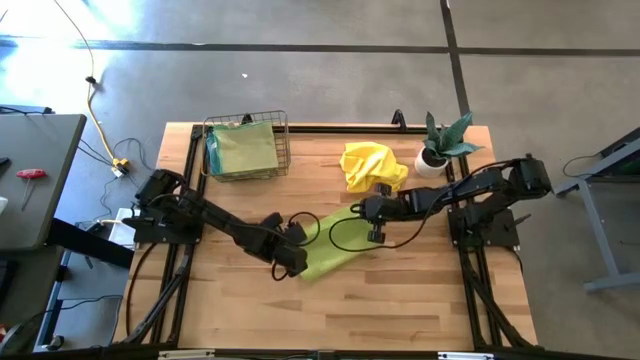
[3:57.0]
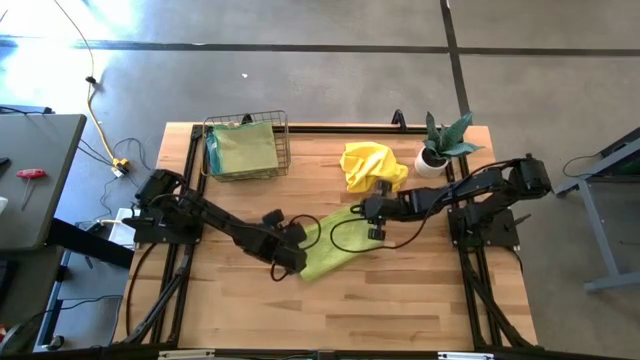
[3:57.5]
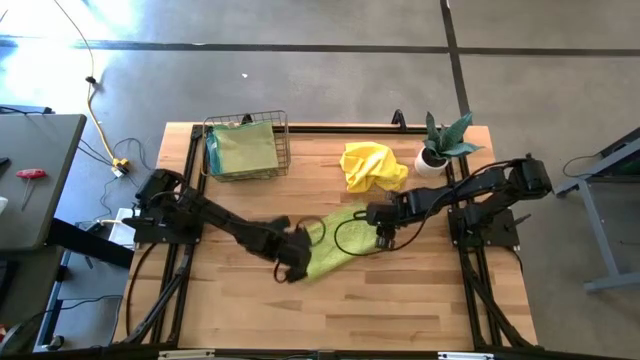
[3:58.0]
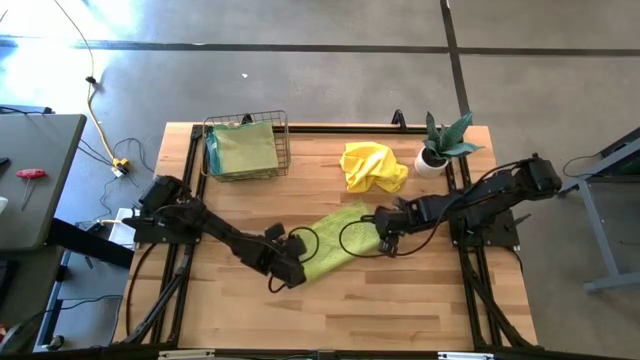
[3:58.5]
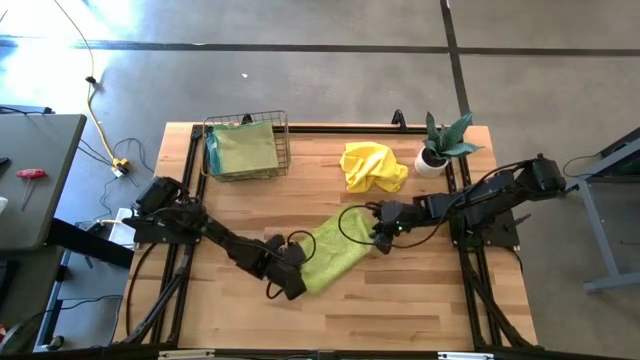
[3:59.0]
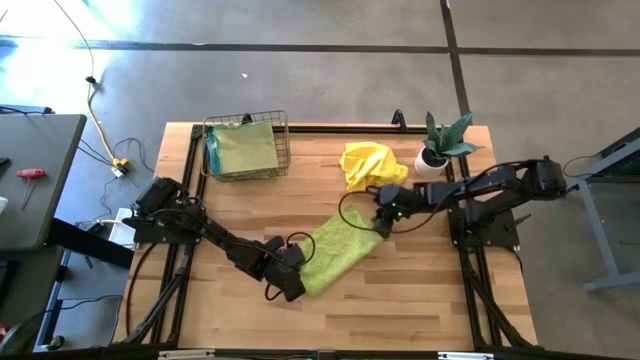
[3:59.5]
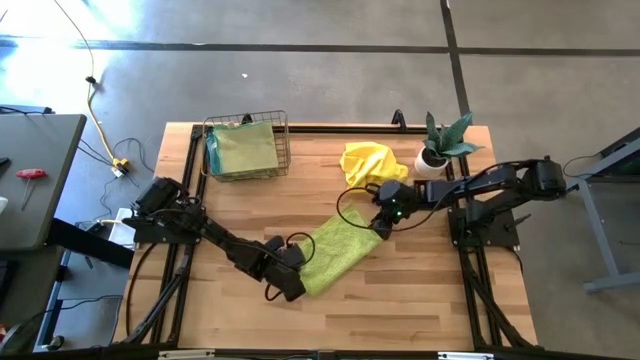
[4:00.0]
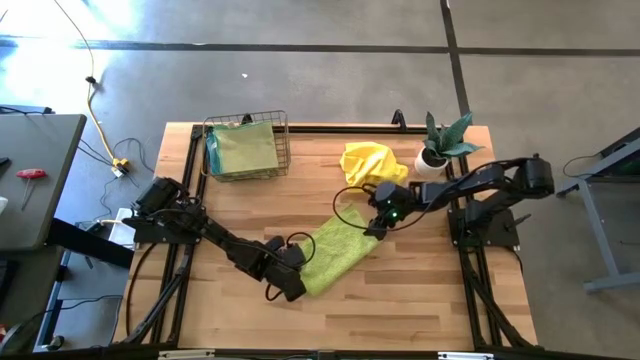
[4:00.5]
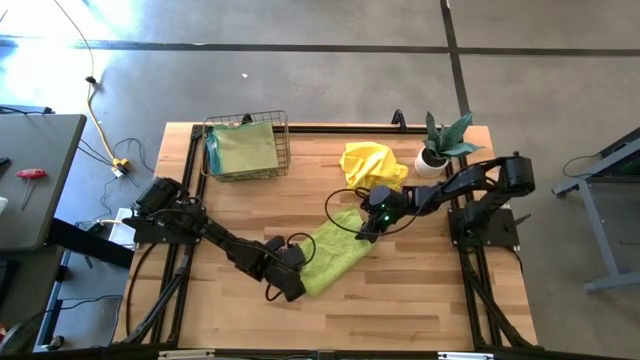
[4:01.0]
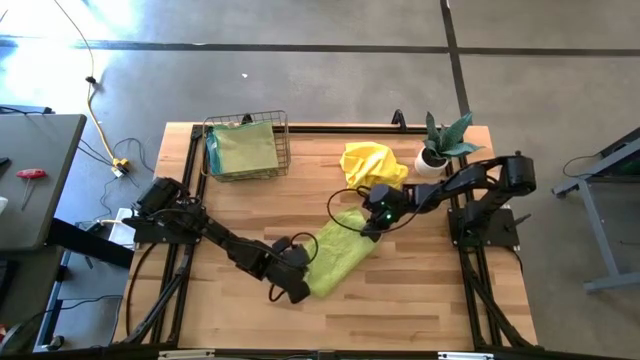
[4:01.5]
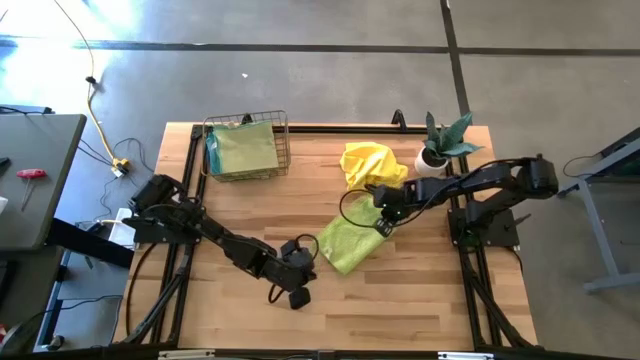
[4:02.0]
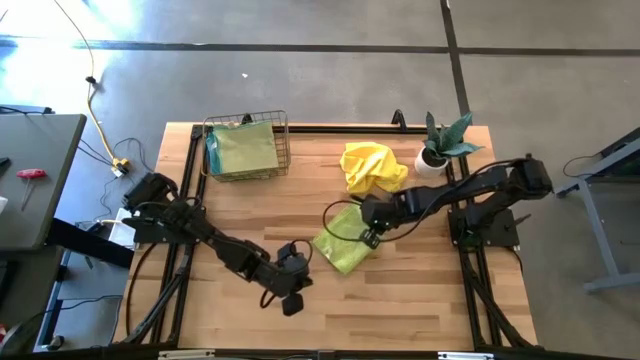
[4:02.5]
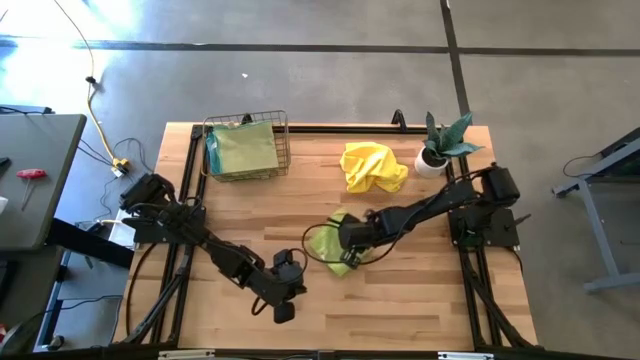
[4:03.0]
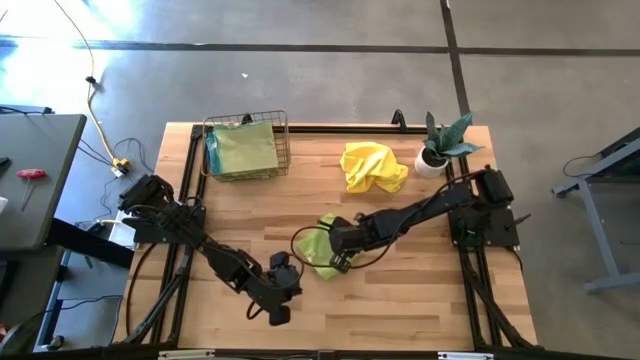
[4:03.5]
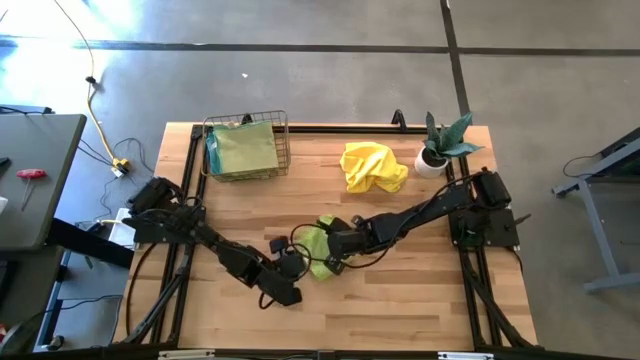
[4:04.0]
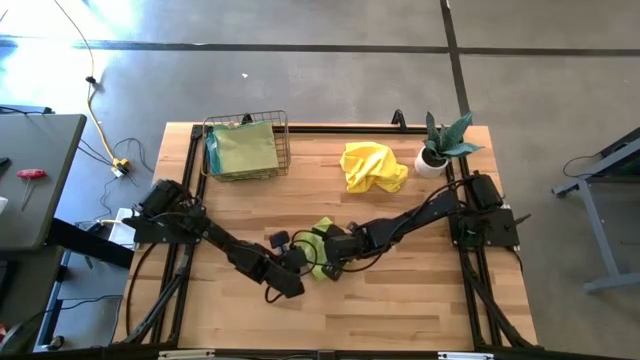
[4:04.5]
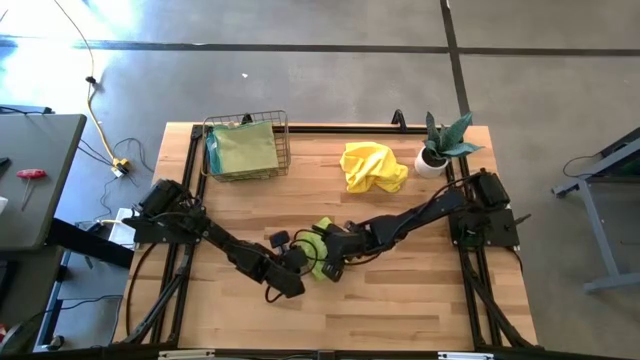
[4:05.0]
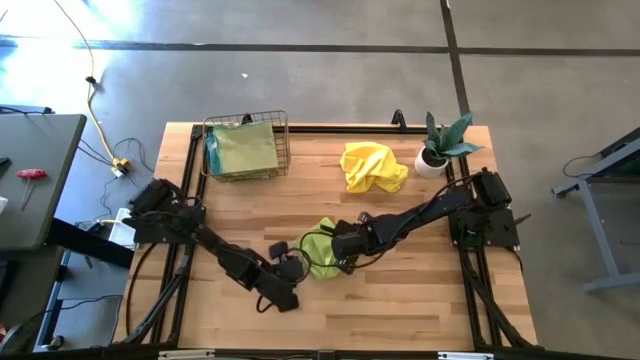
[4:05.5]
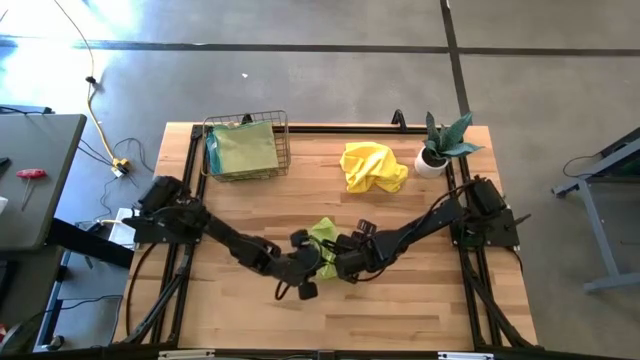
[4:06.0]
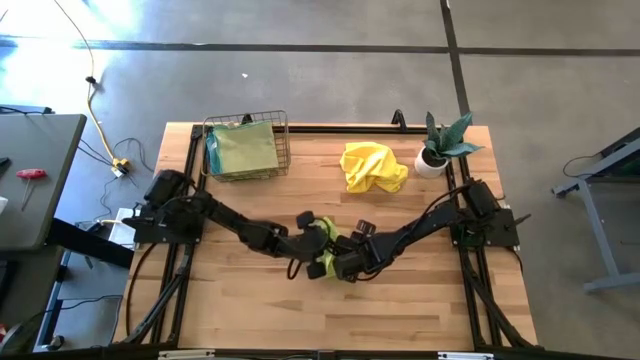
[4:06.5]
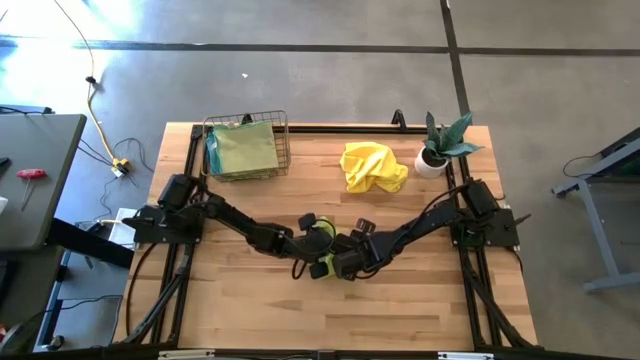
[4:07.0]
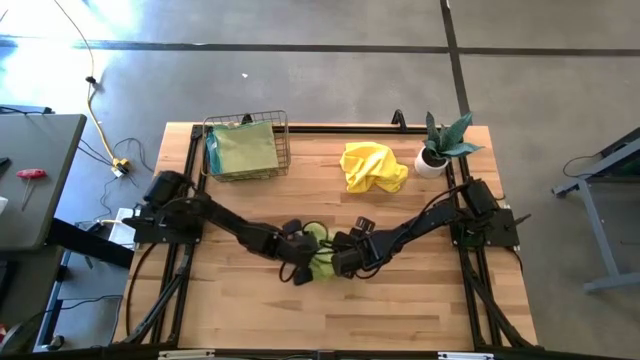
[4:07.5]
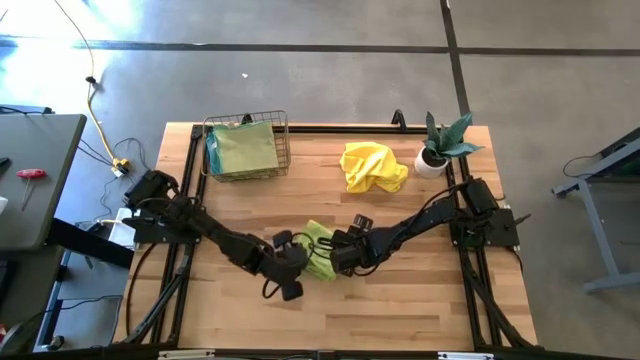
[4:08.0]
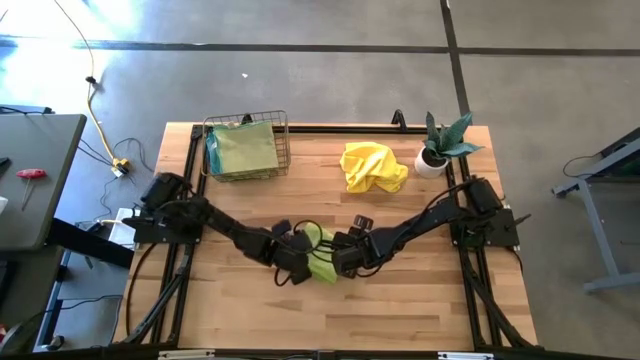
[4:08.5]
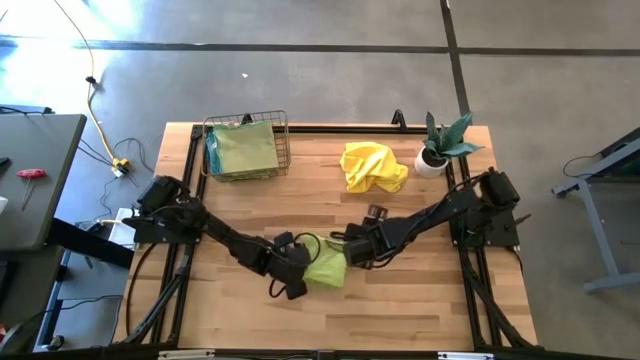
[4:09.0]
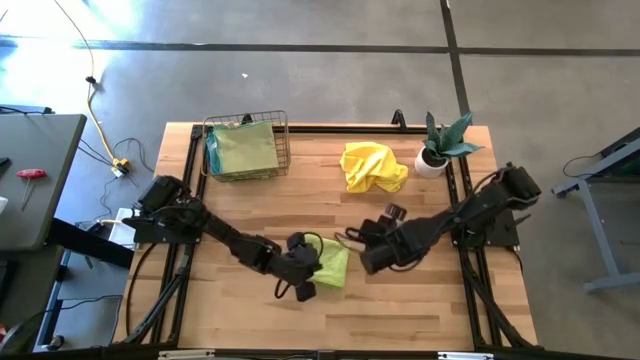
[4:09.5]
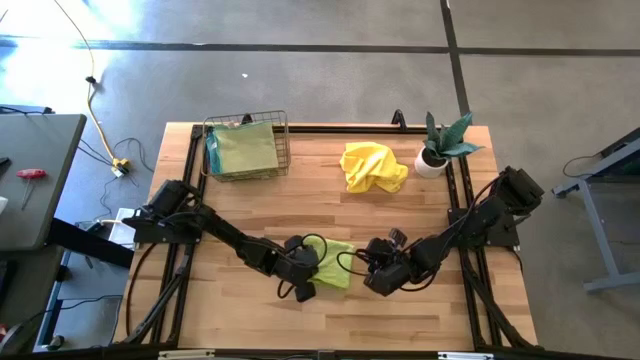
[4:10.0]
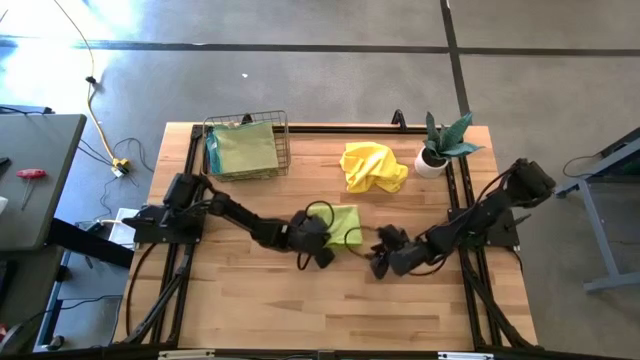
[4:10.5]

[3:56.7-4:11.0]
Task: Fold microfiber towels
Fold the light green towel

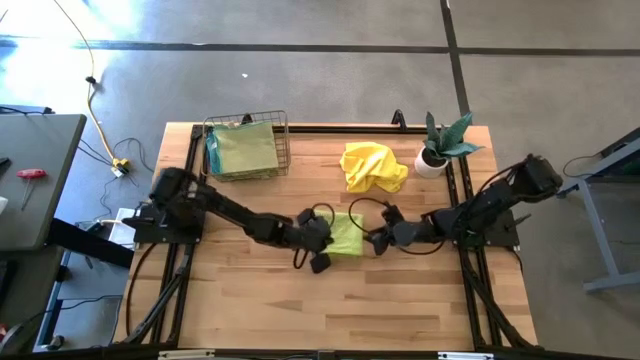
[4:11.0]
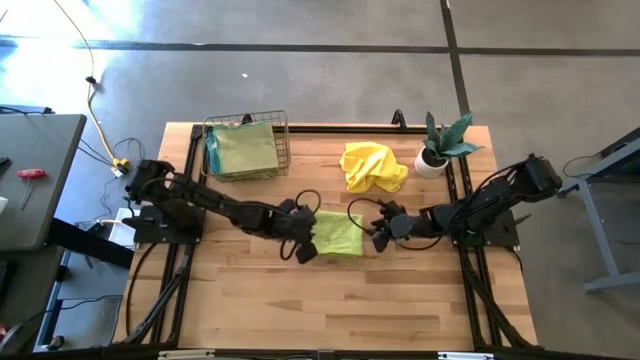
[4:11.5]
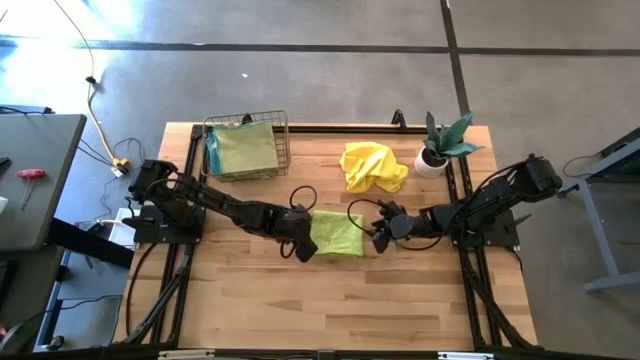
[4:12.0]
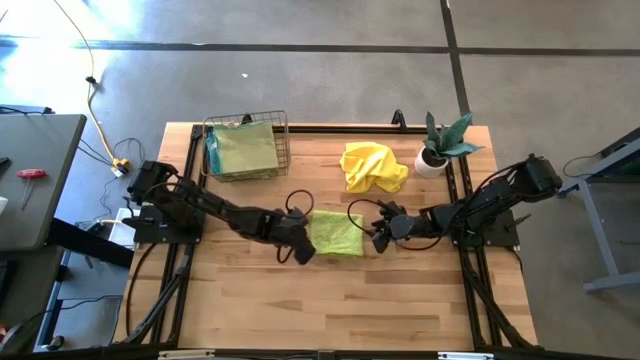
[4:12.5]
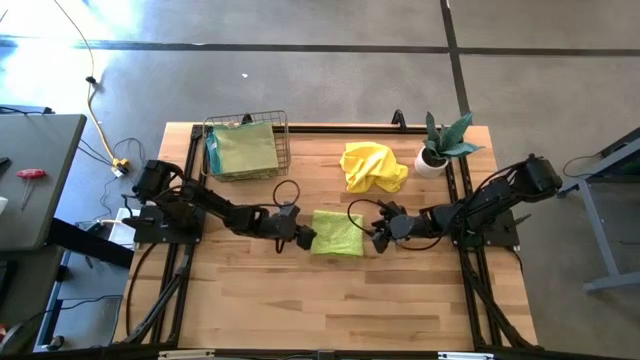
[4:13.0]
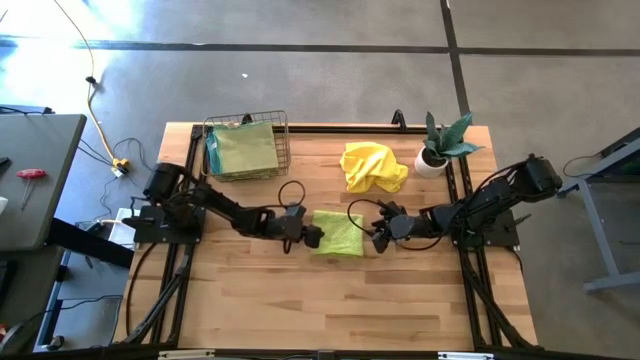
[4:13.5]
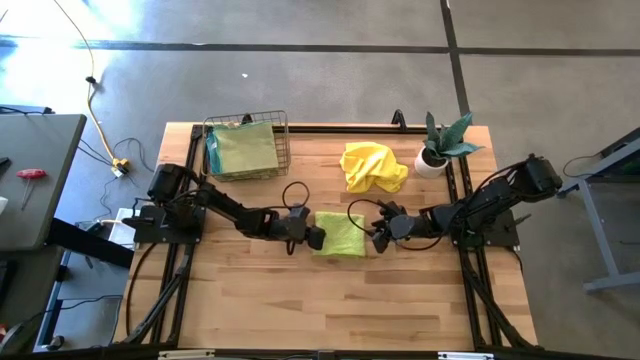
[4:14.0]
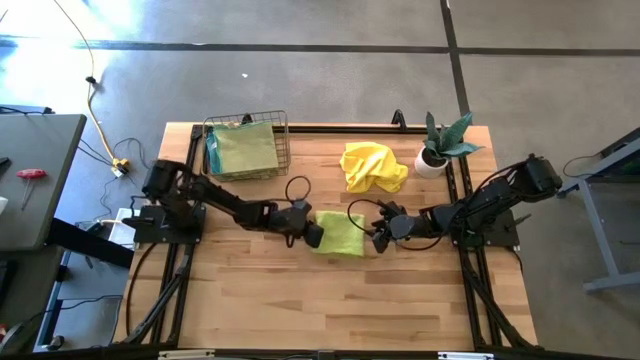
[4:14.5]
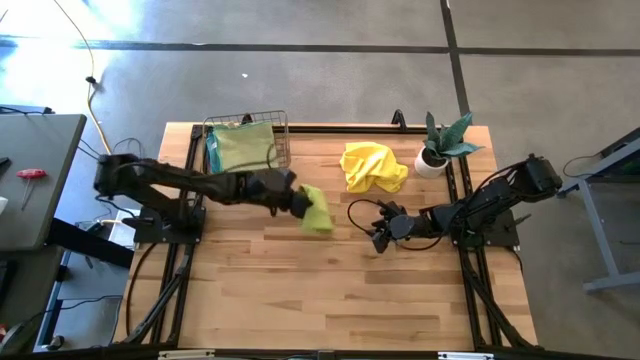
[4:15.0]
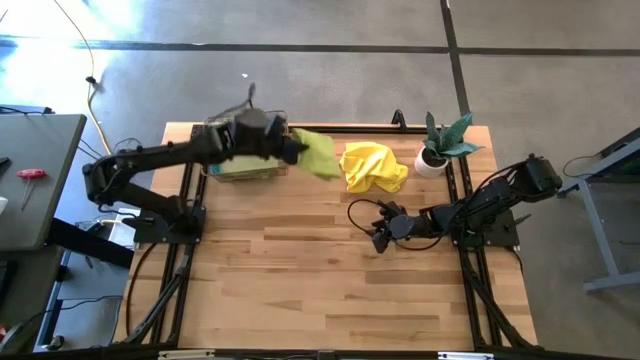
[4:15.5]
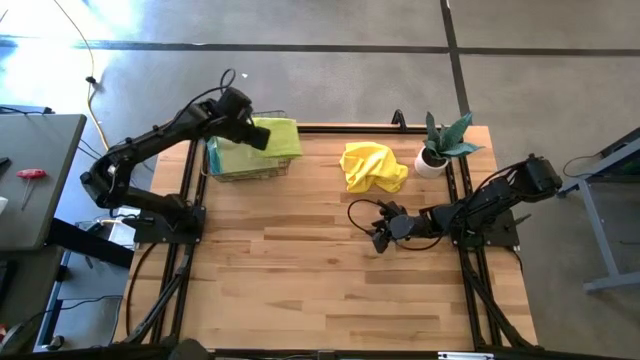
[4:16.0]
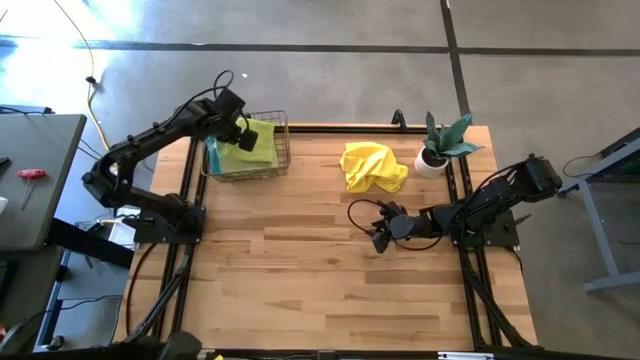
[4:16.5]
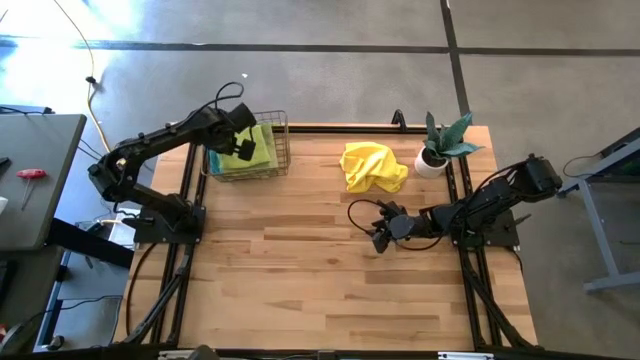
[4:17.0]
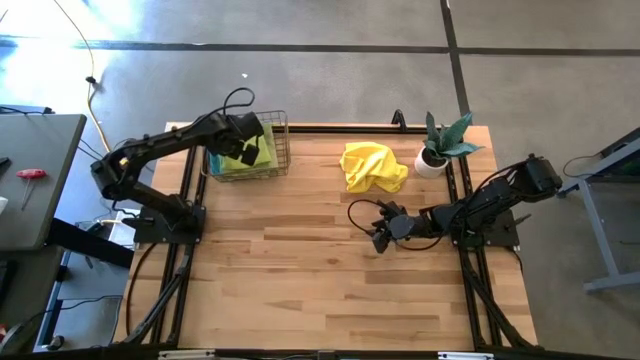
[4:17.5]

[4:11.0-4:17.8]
Put the folded light green towel into the wire basket
